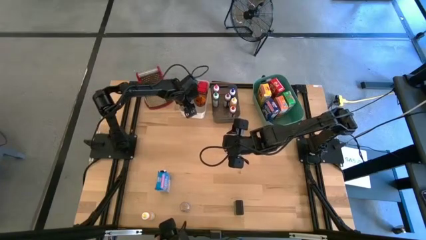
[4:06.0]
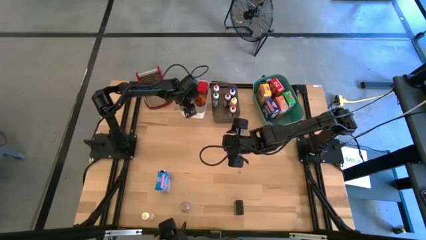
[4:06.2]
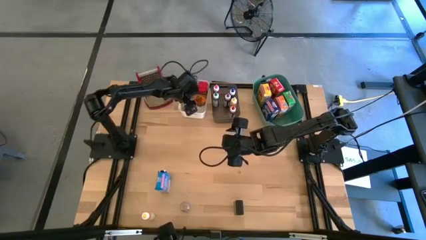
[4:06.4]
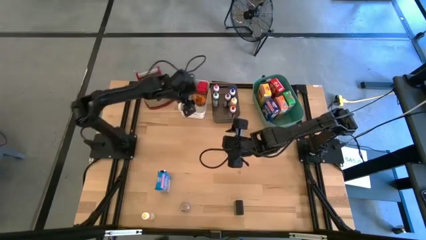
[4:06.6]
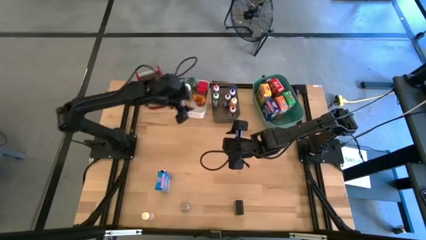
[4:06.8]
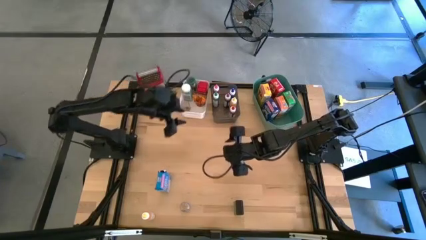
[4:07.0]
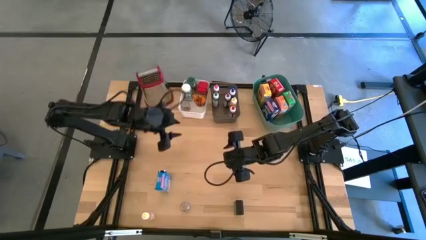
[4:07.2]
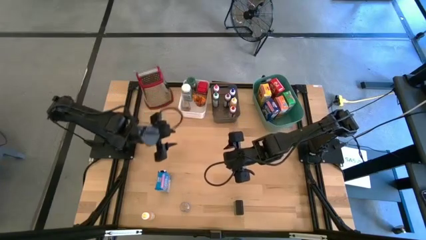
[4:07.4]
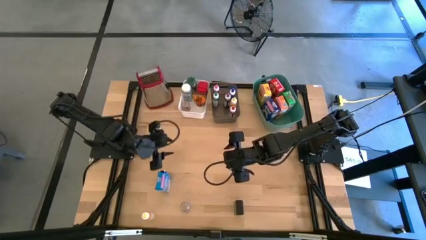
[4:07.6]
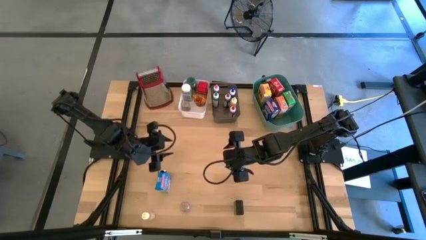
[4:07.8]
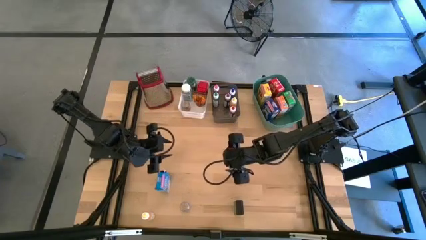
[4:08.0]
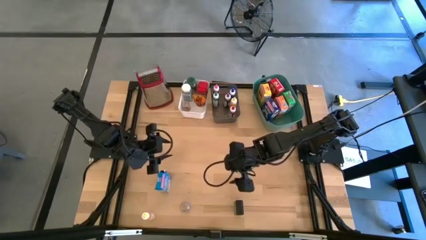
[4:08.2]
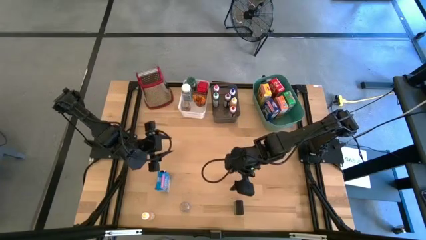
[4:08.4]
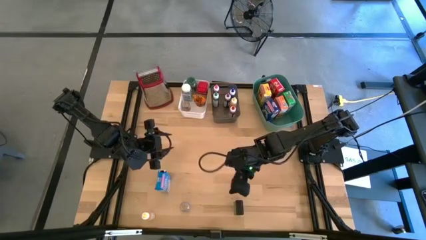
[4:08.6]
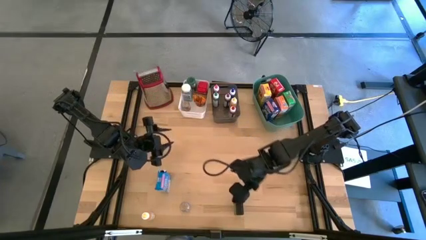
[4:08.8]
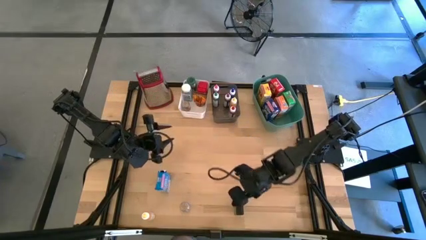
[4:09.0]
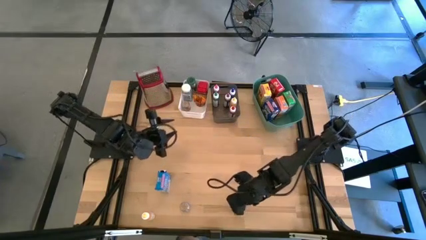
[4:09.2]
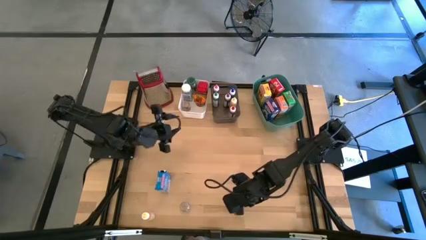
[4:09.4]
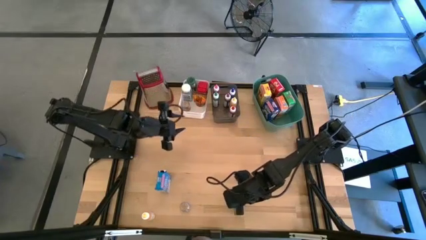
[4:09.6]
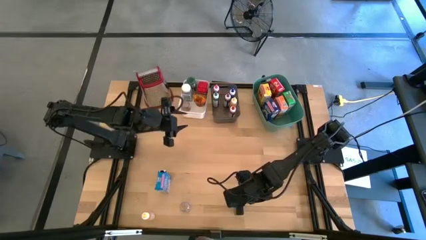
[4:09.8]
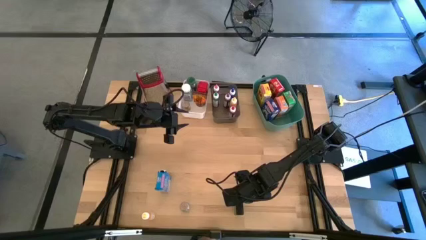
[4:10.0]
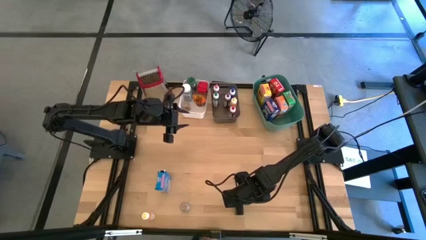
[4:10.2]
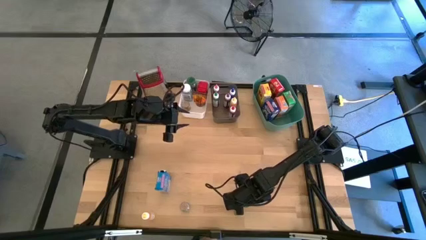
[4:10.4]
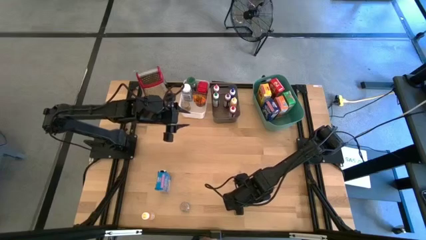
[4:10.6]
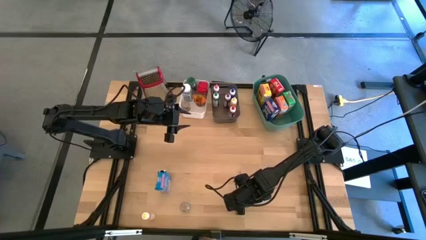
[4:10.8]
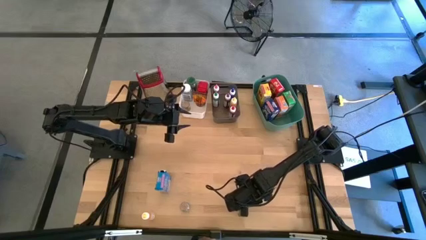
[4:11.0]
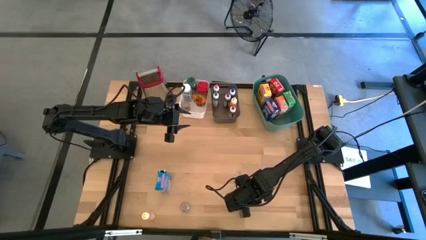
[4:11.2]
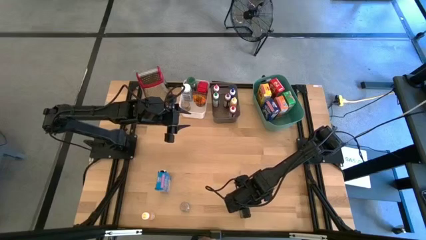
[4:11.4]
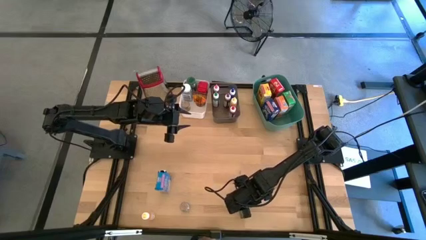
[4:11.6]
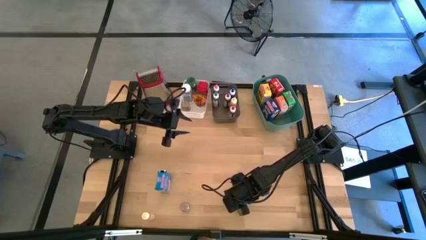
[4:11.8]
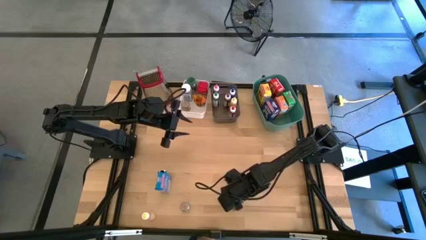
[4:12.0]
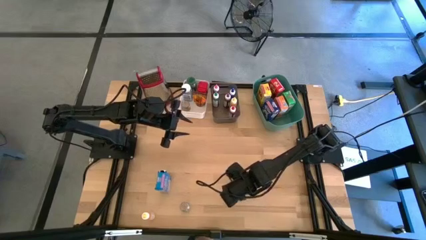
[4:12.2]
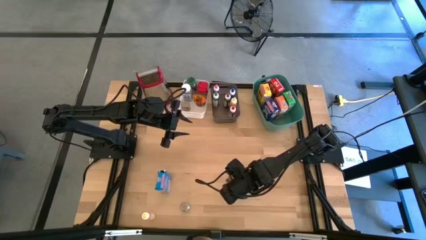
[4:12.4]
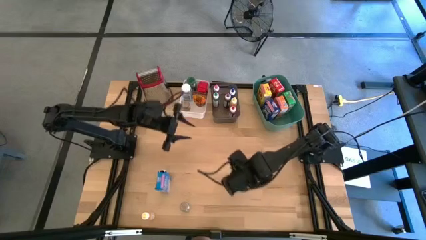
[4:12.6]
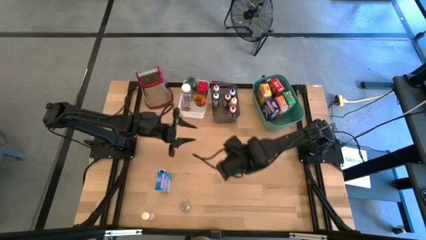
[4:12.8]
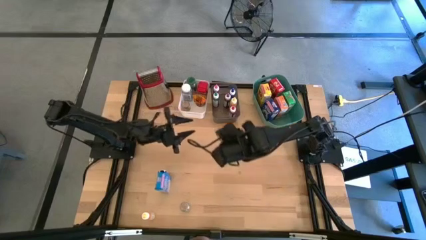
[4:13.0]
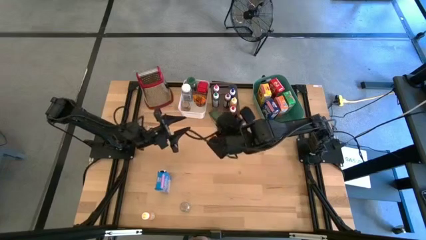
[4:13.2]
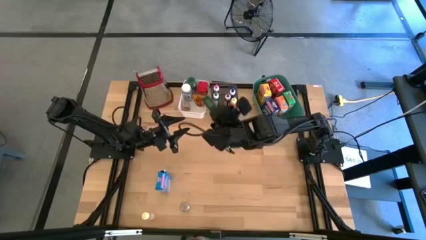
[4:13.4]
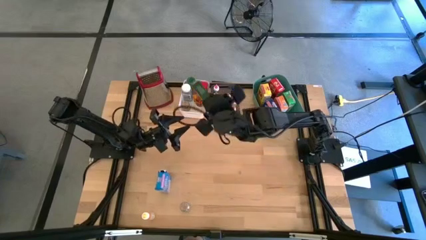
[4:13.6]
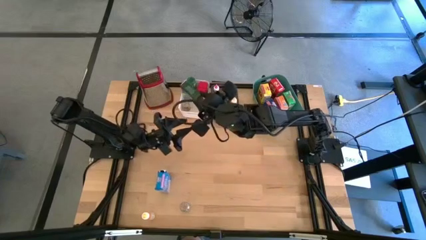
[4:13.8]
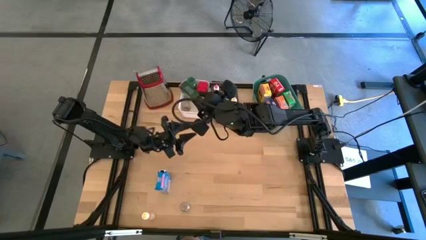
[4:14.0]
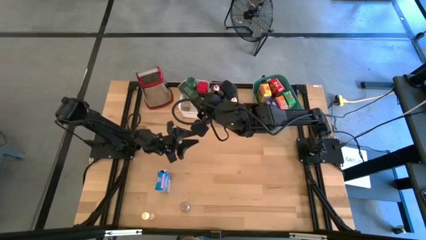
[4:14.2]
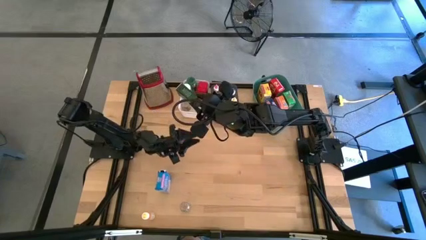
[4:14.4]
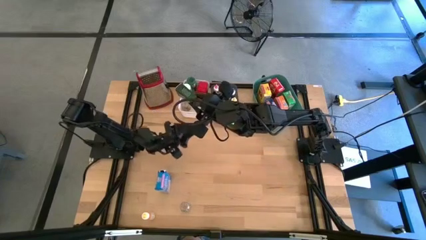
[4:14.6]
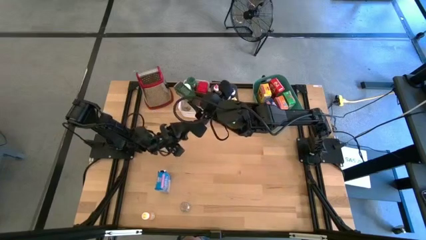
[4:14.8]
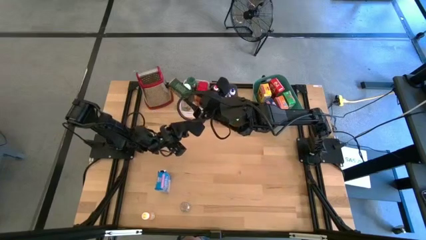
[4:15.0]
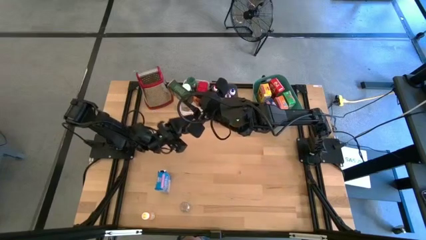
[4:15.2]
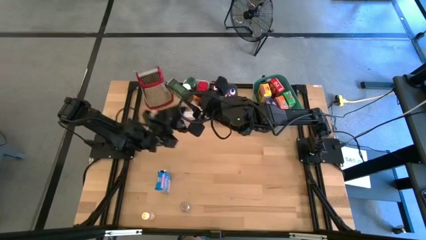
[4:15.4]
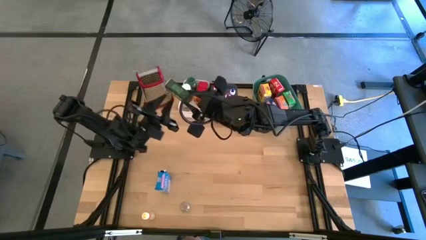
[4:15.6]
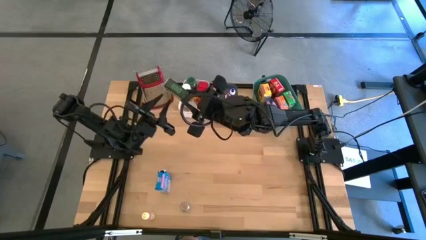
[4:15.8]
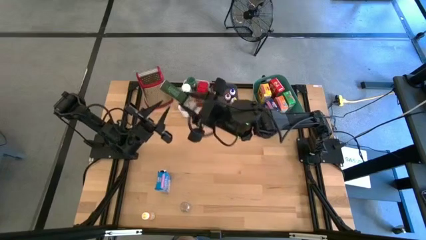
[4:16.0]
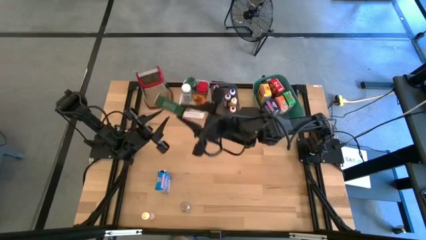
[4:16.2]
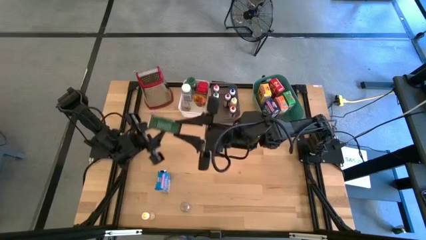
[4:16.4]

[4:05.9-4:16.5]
Task: Pick & Place Kitchen Items
Put the black seasoning can into the white bin

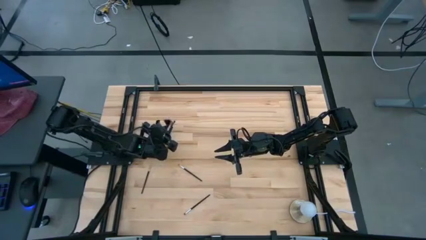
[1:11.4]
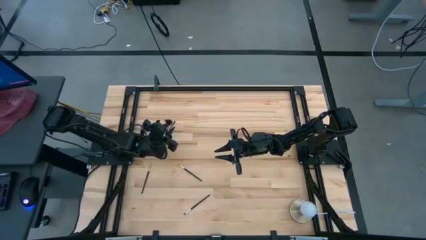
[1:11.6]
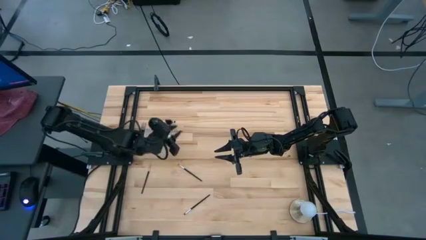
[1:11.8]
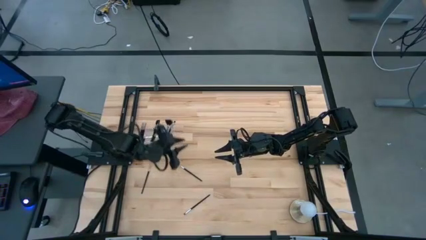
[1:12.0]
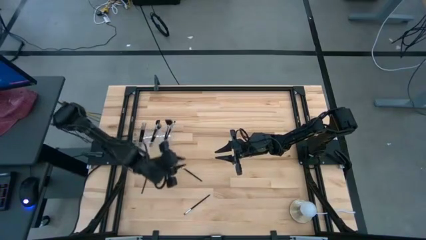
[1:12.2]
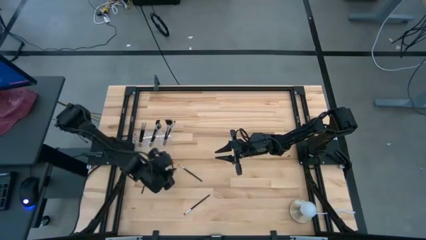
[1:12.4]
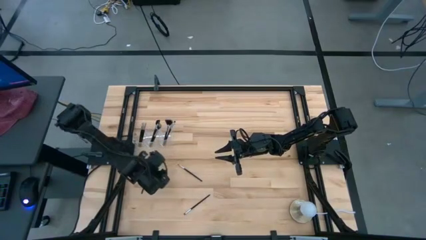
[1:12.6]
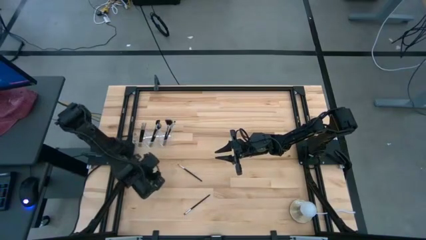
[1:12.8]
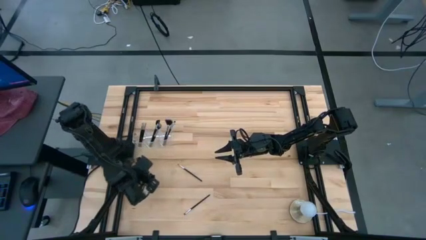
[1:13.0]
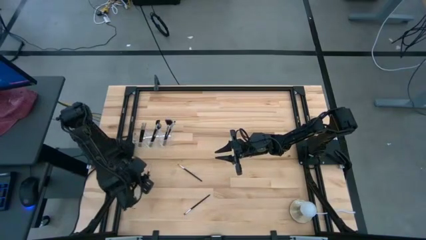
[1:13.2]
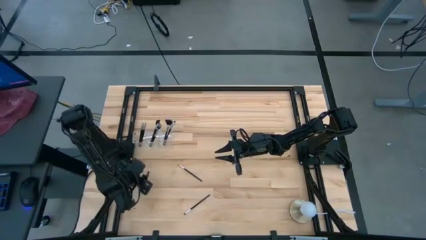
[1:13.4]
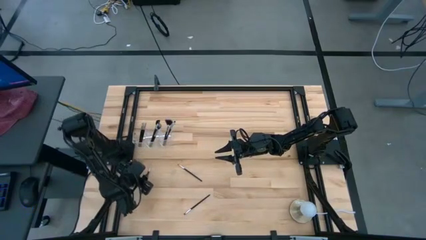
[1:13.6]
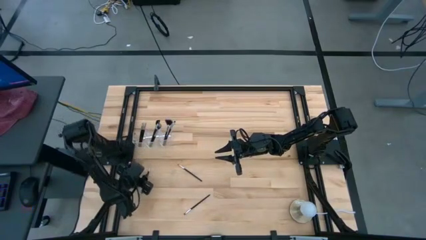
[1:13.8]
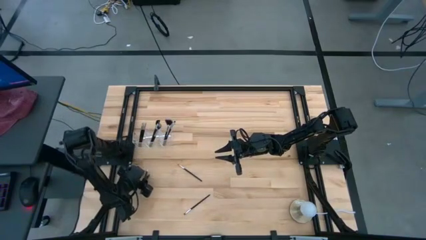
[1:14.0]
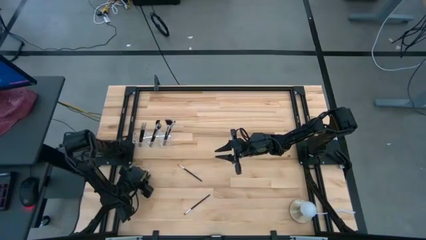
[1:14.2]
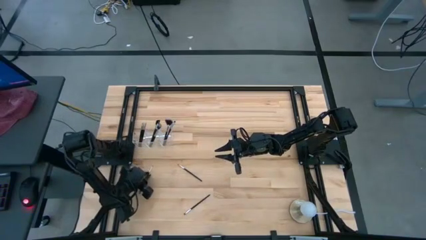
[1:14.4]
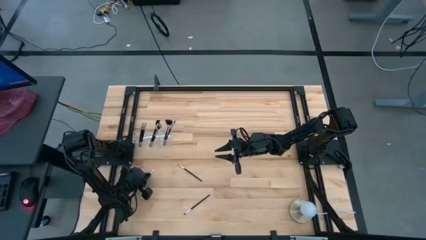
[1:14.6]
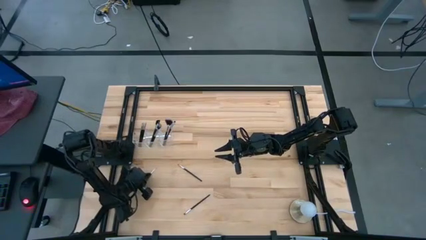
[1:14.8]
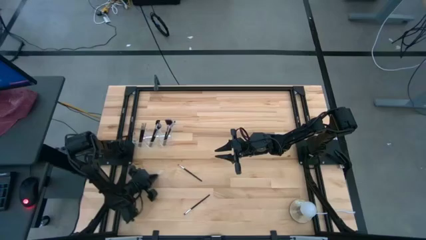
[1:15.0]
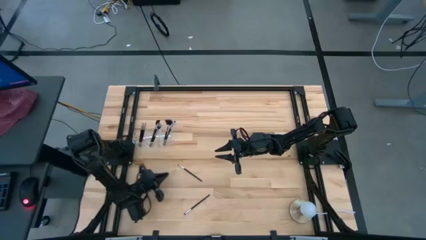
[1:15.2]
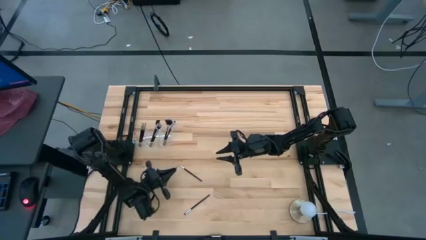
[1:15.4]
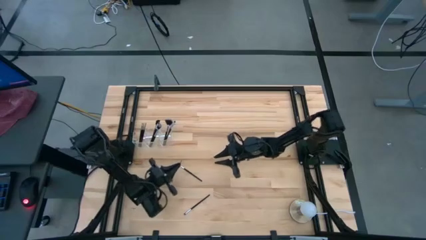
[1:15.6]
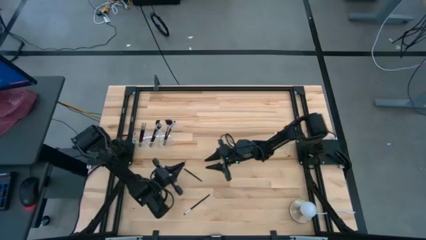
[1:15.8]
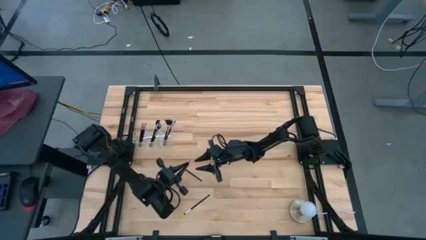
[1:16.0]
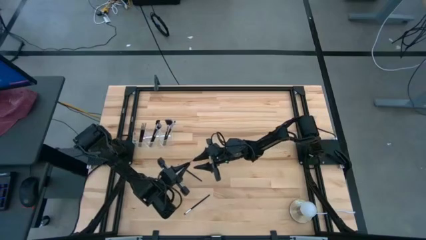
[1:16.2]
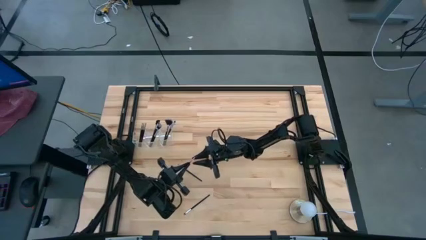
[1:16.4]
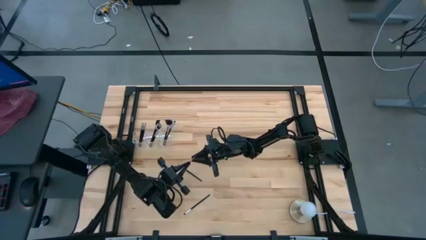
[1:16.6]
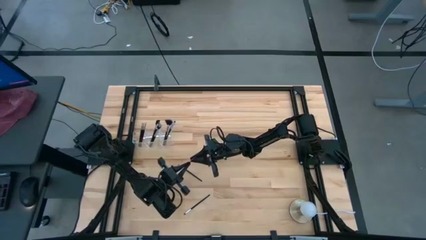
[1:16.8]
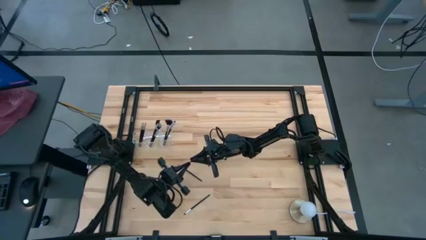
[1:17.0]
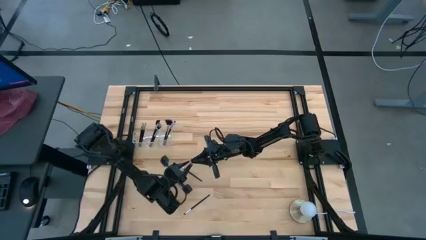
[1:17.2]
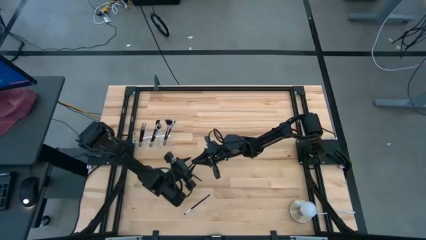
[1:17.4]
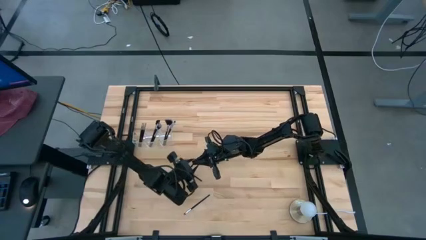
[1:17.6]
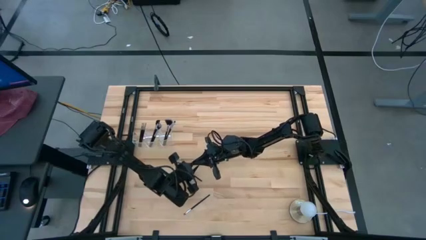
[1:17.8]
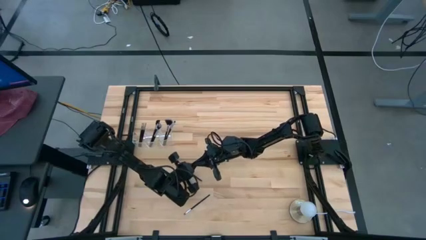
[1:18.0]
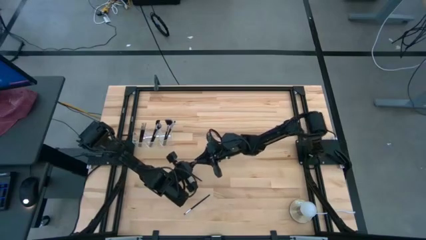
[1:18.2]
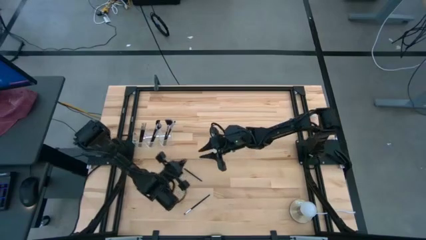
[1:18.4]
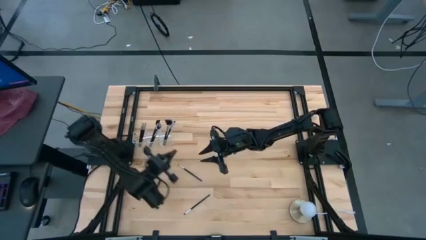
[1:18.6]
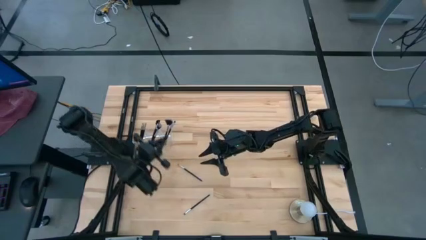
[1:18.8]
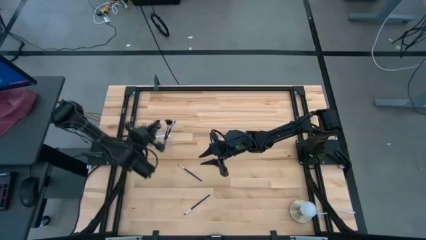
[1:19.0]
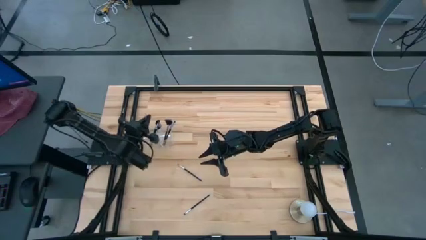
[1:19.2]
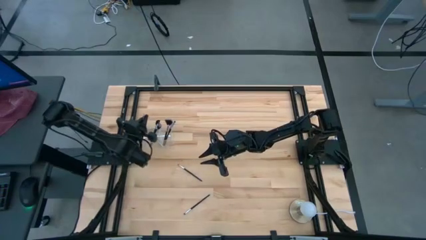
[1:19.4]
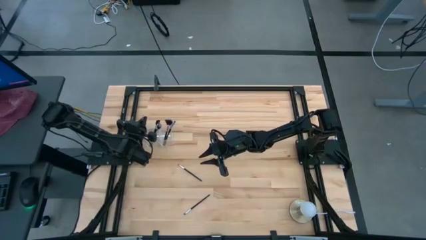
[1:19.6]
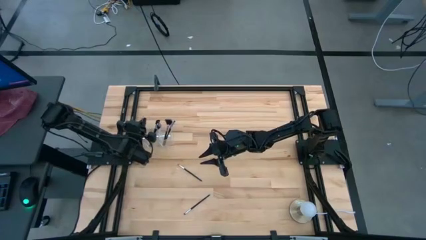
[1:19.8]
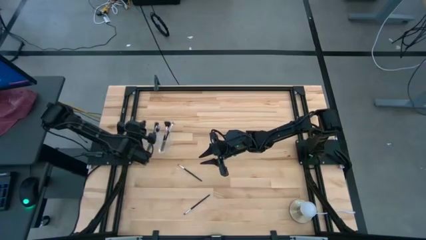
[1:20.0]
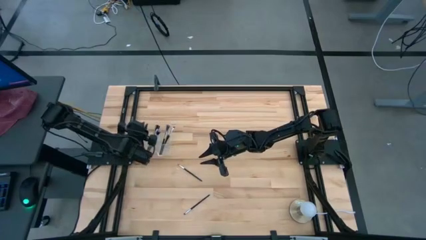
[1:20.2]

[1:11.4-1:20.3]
Task: Put items in baskets/containers
Put the black liner brush into the transparent organizer
